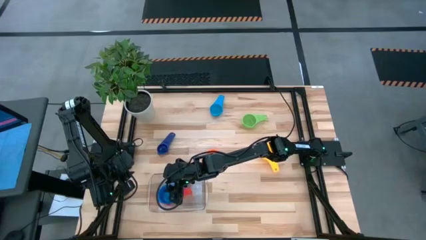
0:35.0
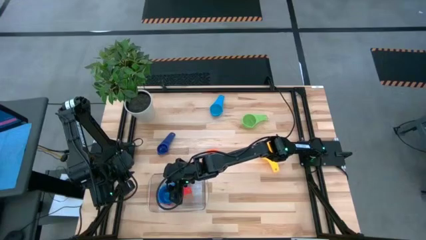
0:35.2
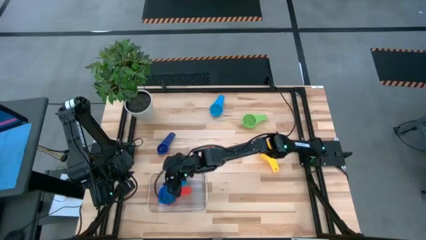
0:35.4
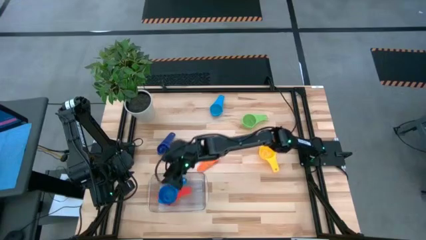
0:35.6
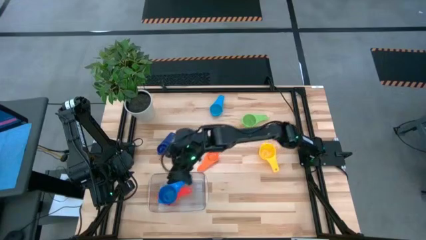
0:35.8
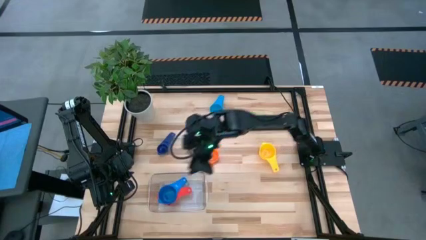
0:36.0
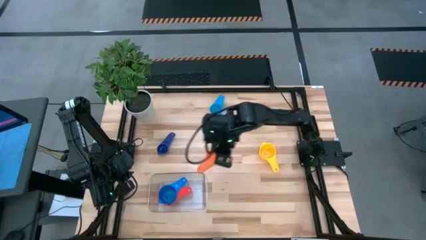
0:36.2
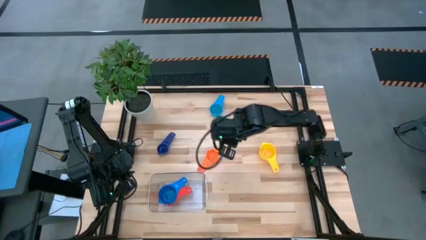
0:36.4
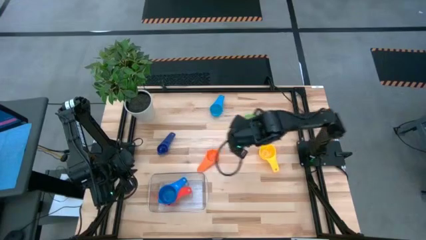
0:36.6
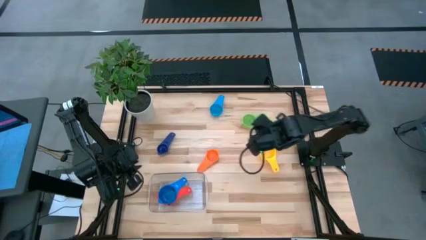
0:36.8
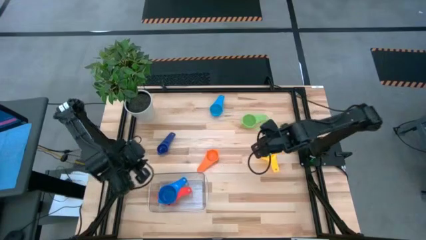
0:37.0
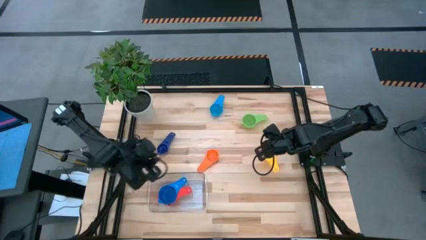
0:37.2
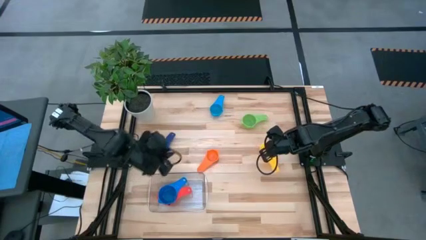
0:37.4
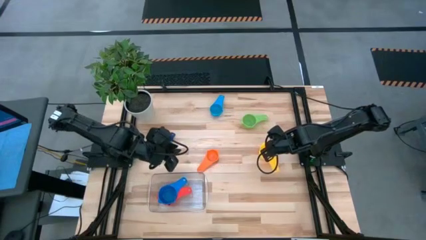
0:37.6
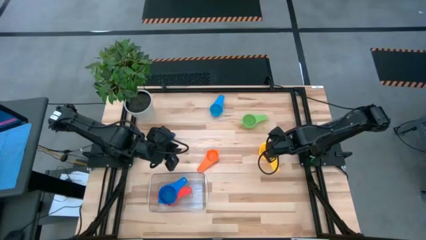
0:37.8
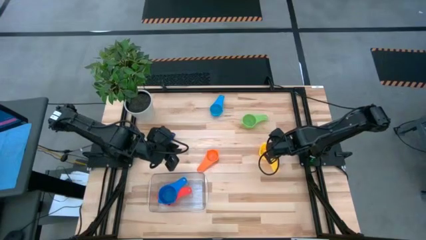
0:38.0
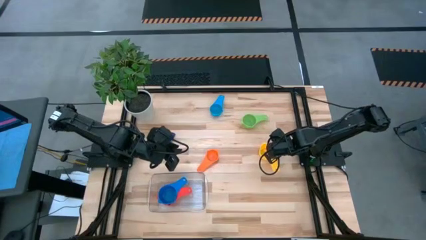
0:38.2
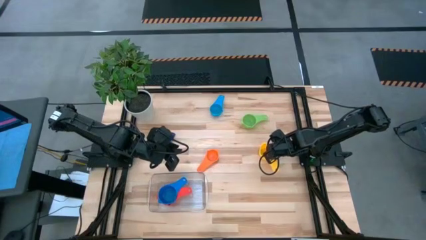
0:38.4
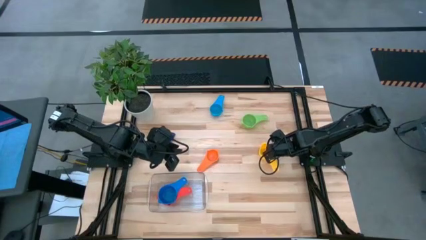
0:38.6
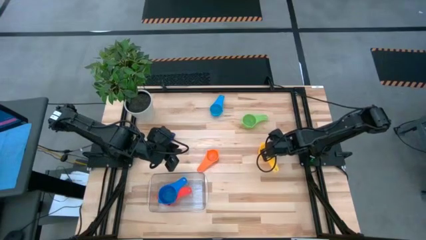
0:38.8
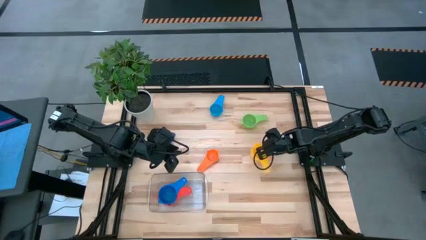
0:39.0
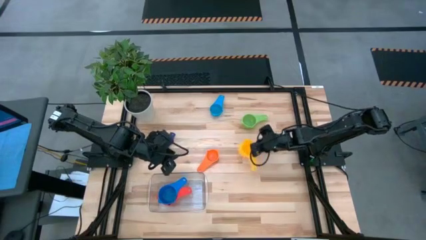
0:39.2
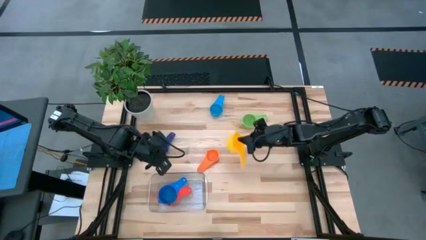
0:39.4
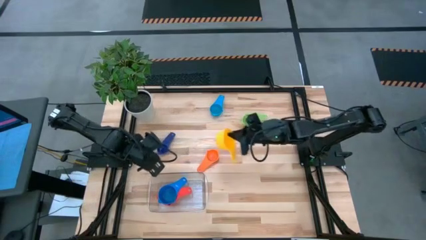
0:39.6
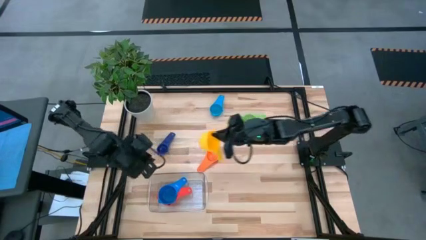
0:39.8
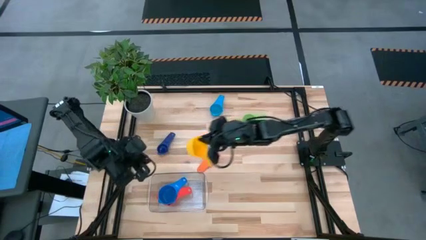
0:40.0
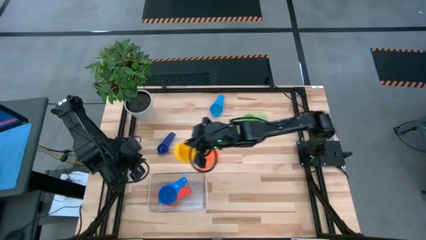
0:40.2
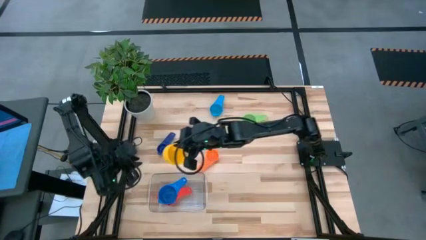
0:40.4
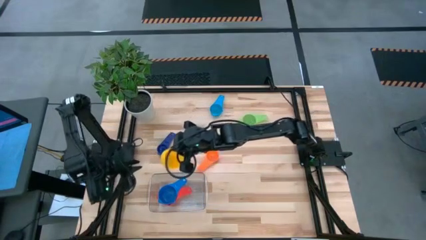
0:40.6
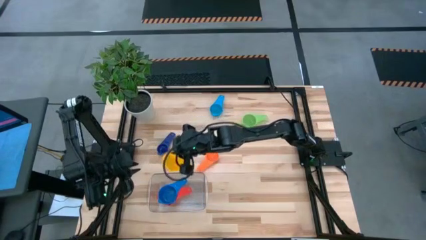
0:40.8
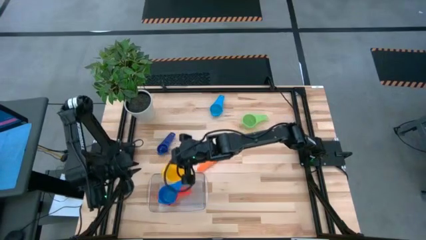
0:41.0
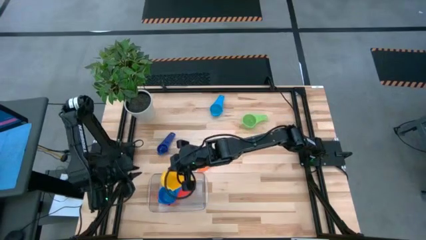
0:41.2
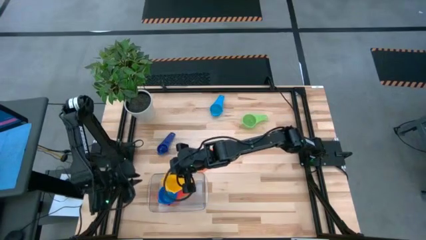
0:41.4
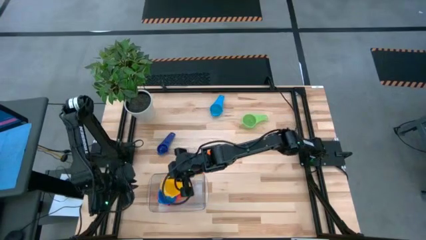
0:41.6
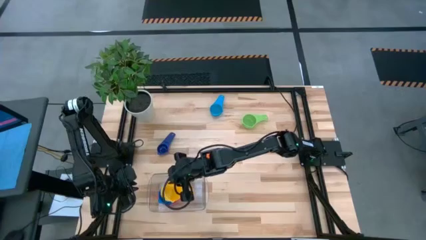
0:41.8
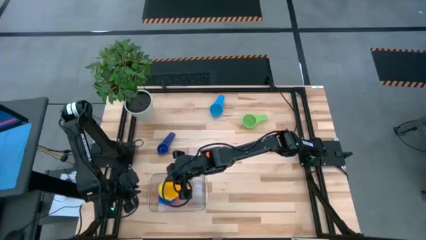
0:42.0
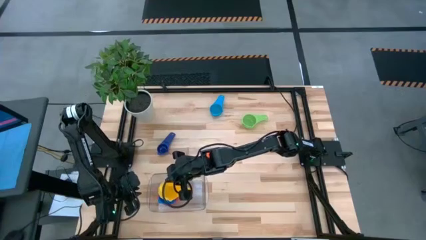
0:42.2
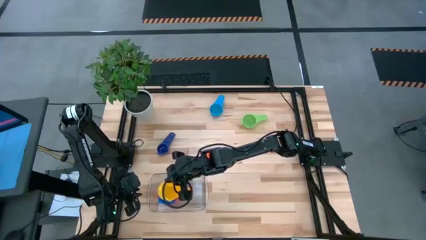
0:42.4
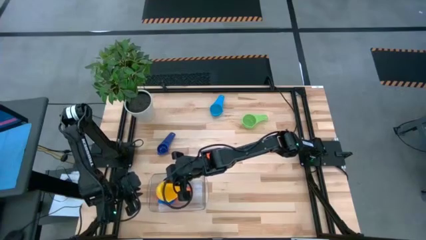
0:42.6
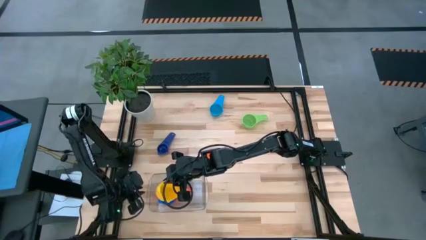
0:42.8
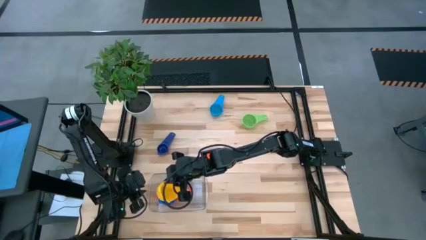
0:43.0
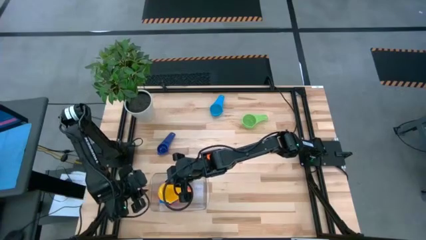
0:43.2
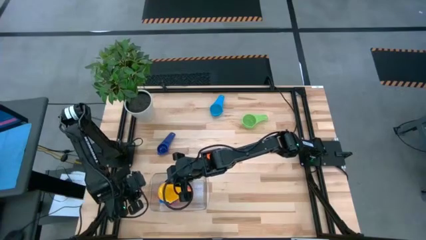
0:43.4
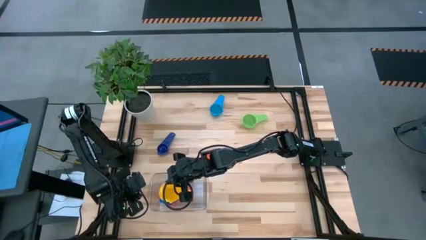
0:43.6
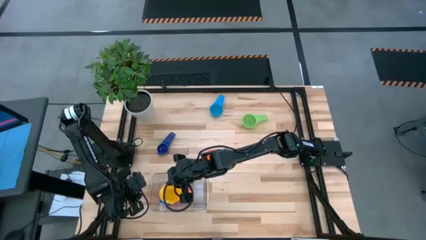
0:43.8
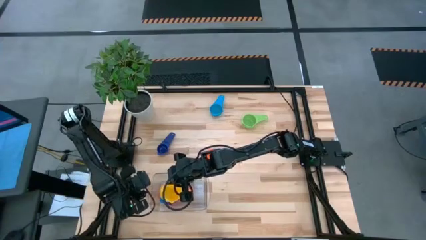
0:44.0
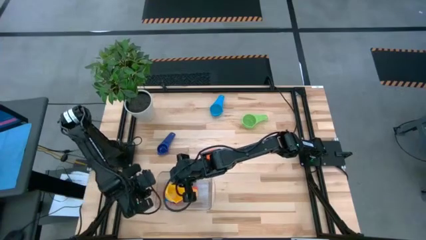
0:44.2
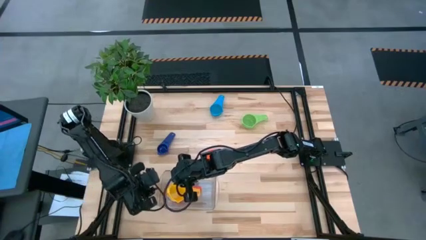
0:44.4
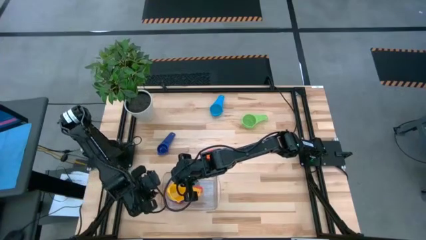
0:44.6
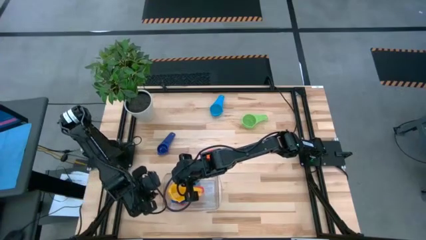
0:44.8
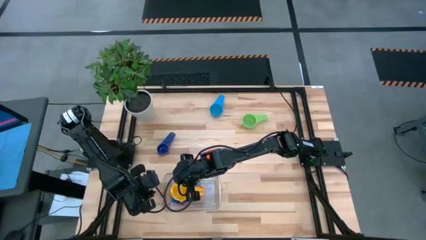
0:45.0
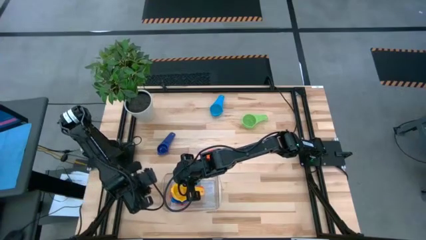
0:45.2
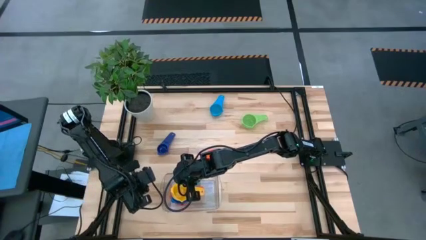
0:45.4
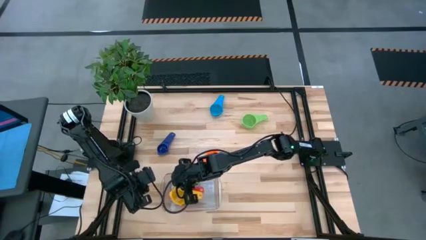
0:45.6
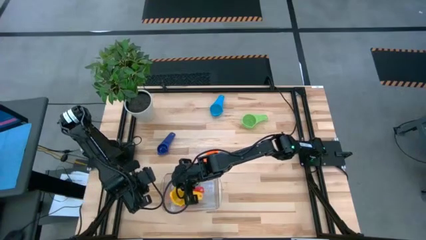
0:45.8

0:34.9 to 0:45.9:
Task: Nest measuring cups in basket
Stack the yellow measuring cup on top of the blue measuring cup into the transparent bin

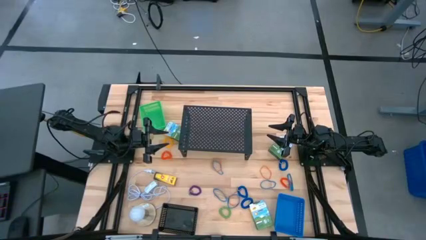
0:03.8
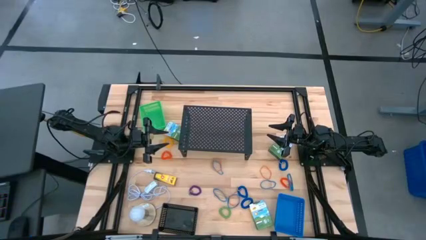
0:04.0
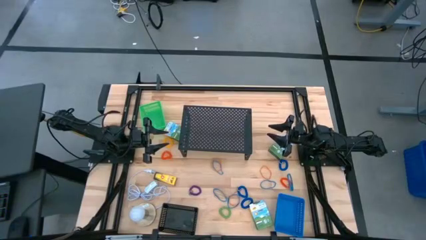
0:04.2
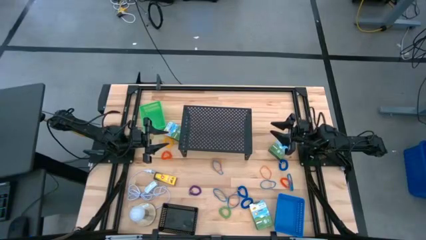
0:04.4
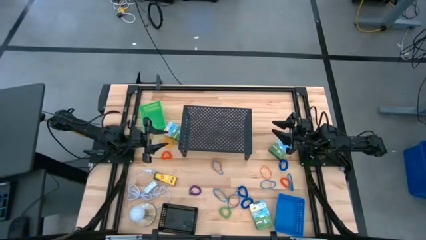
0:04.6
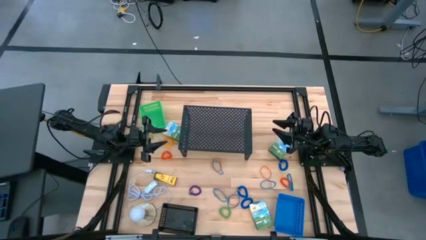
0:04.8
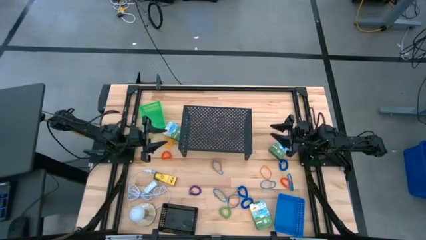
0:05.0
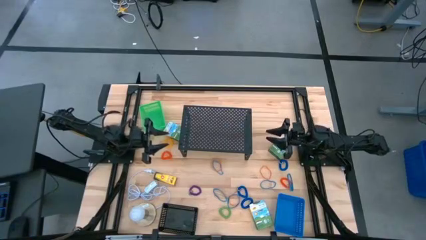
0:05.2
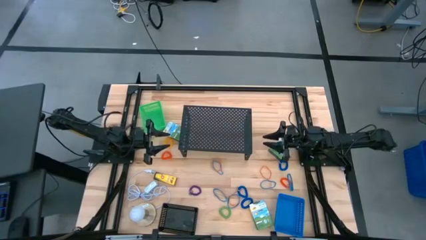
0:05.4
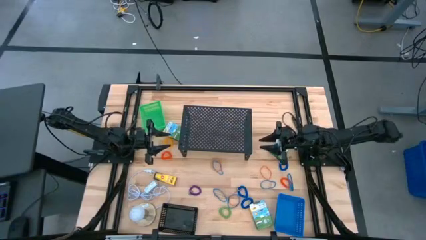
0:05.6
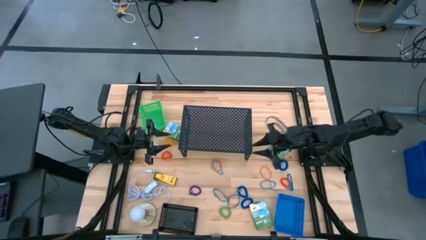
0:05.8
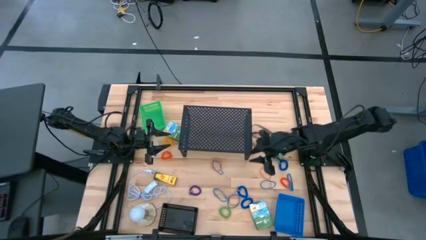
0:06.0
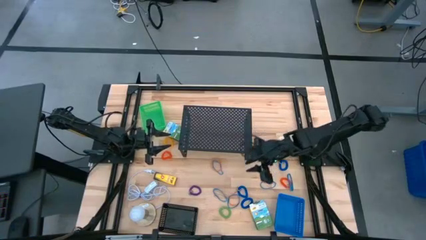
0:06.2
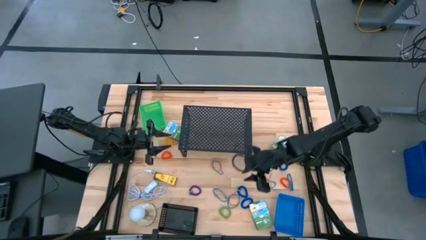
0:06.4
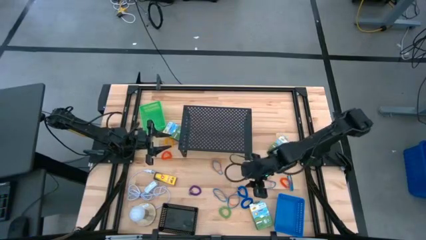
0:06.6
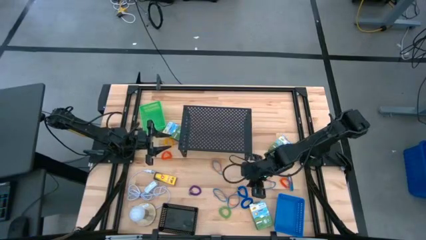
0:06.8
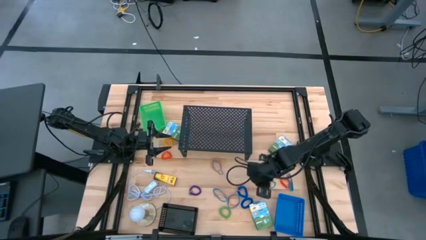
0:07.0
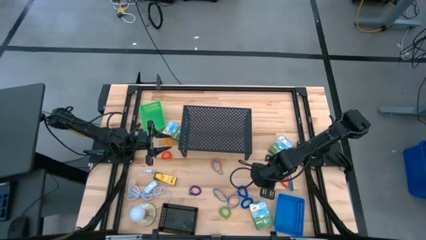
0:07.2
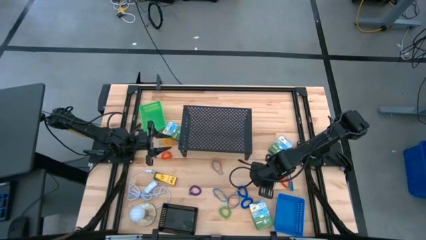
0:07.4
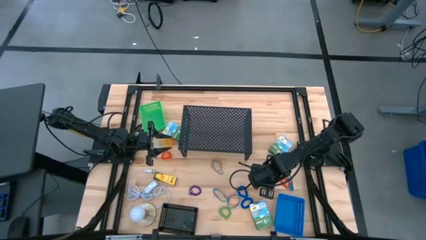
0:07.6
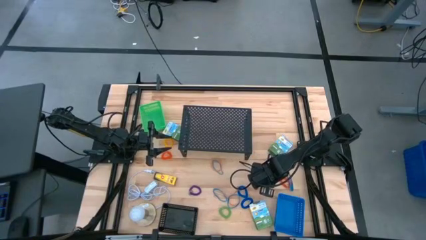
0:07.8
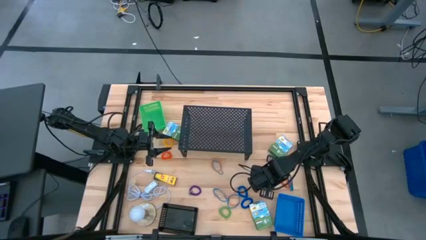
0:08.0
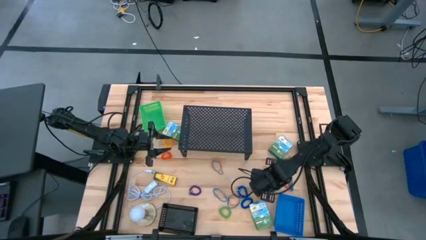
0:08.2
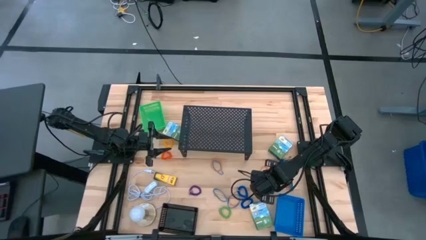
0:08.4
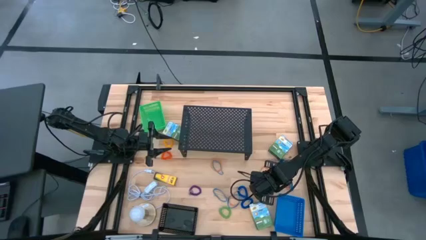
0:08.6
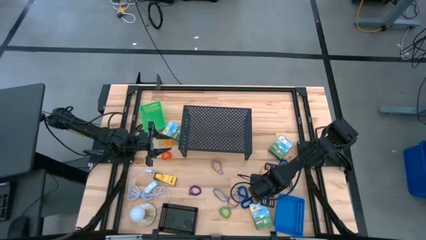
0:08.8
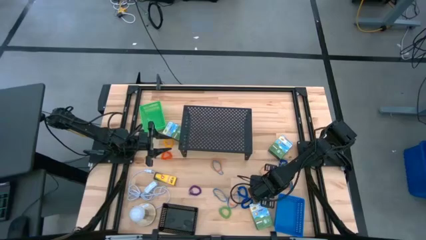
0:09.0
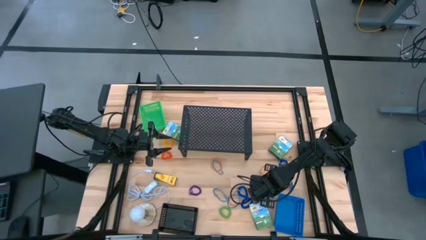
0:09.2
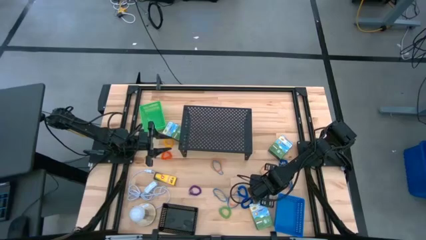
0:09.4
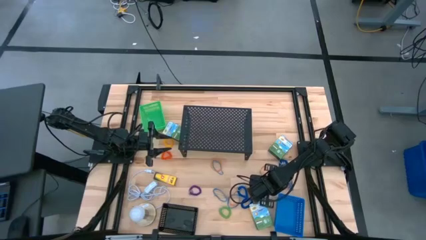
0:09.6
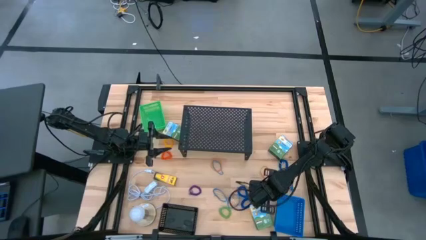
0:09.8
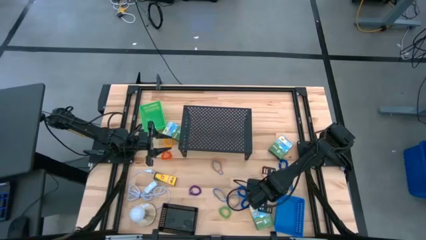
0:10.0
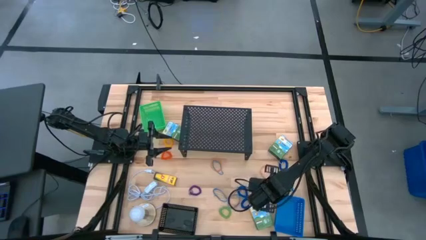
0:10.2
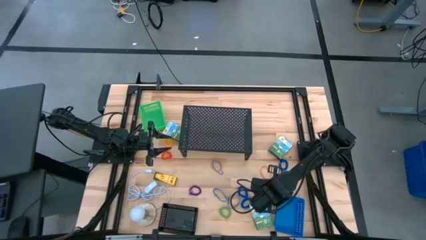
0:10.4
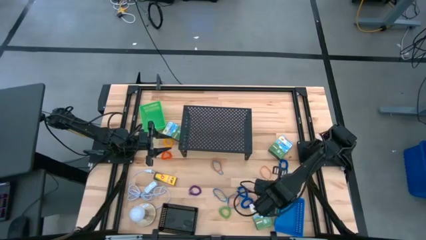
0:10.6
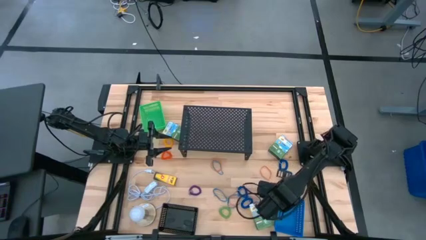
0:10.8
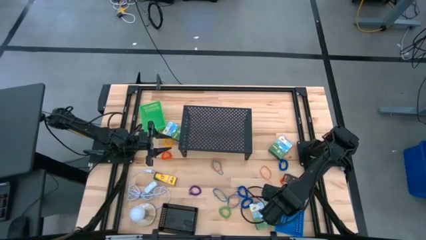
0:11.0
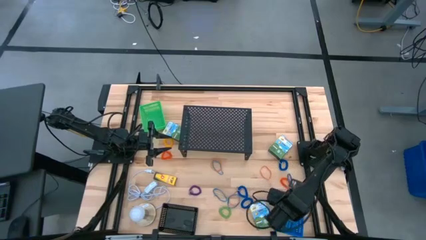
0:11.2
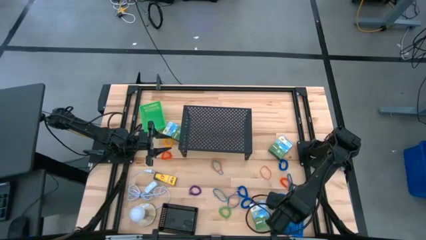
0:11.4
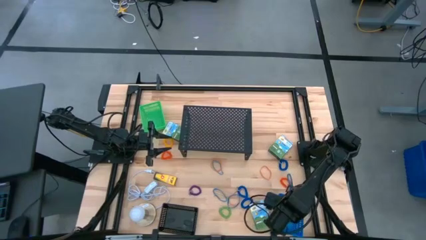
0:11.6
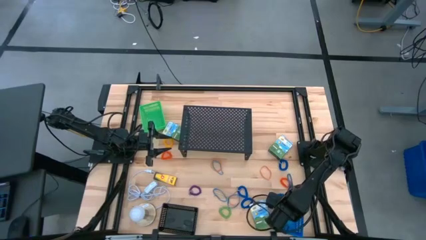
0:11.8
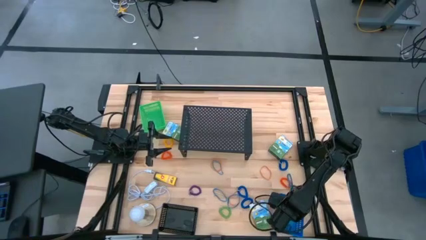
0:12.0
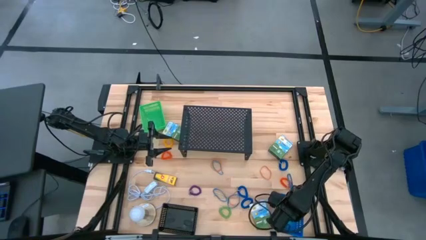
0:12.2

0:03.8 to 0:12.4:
Task: Pick & Place Office Desk Supplies
Put the blue rubber band into the blue bin
